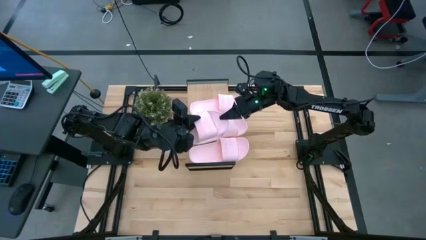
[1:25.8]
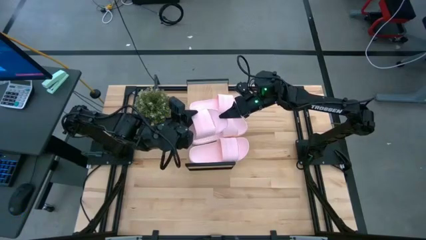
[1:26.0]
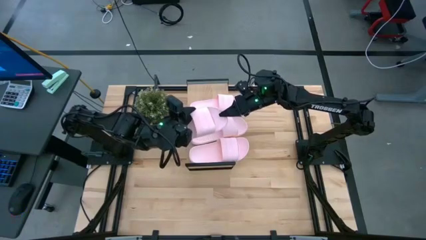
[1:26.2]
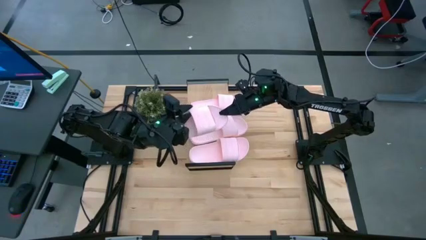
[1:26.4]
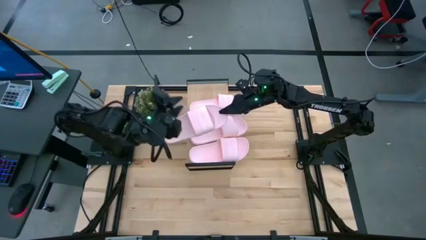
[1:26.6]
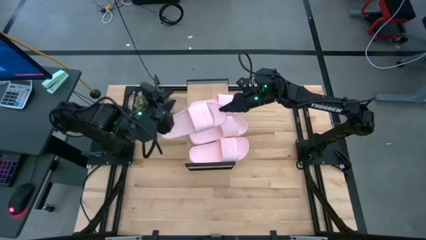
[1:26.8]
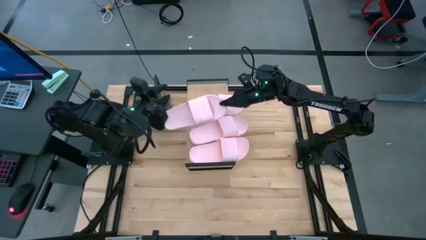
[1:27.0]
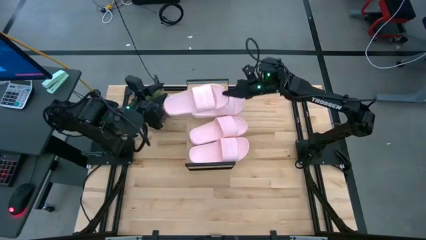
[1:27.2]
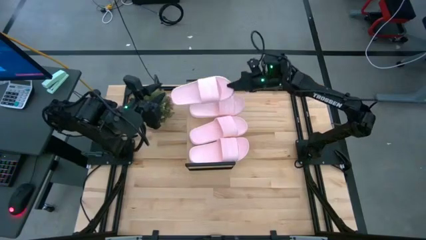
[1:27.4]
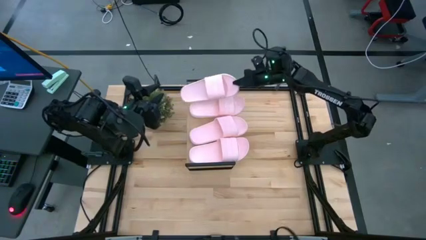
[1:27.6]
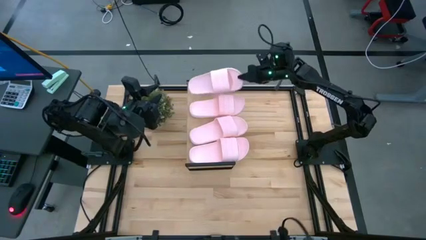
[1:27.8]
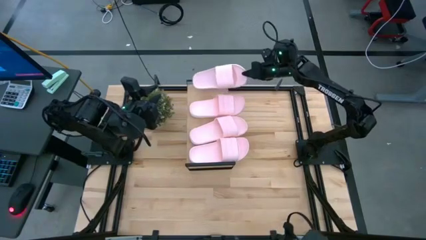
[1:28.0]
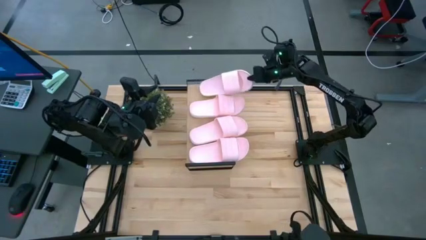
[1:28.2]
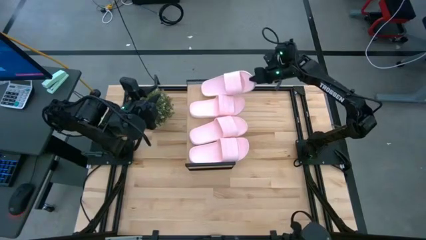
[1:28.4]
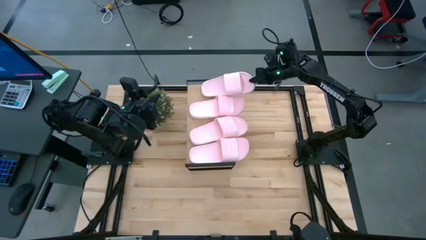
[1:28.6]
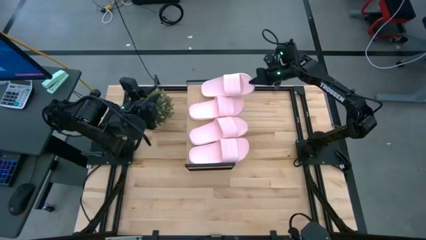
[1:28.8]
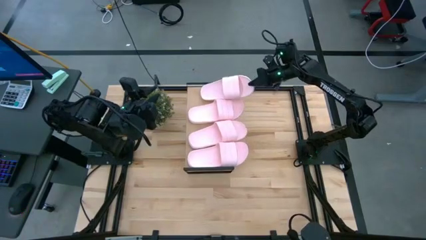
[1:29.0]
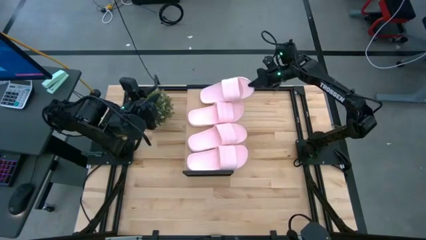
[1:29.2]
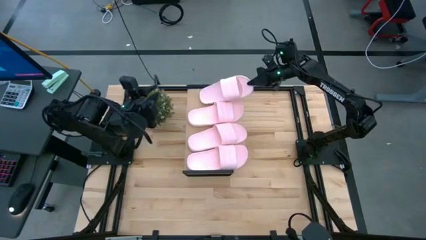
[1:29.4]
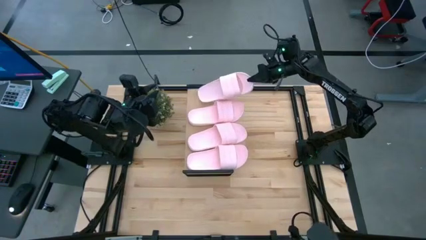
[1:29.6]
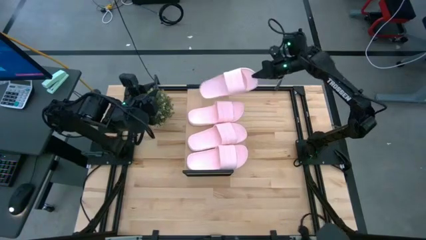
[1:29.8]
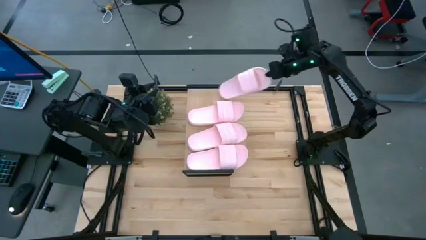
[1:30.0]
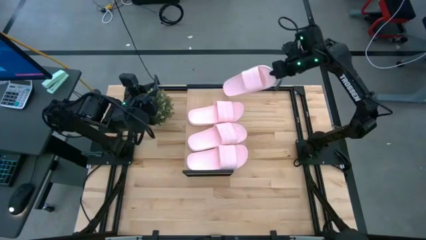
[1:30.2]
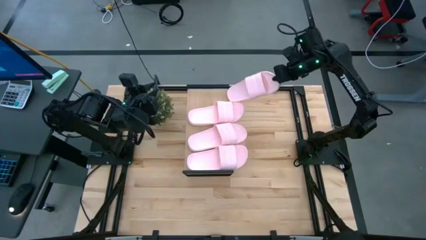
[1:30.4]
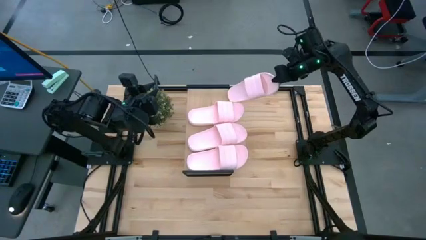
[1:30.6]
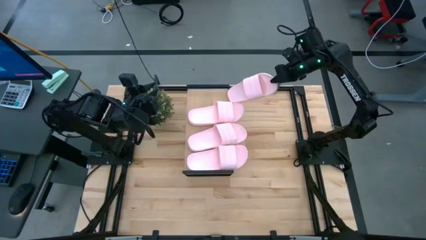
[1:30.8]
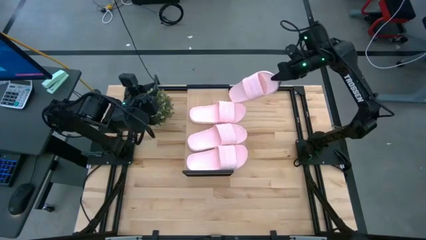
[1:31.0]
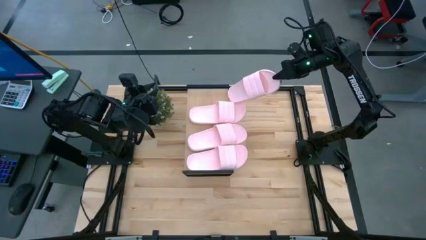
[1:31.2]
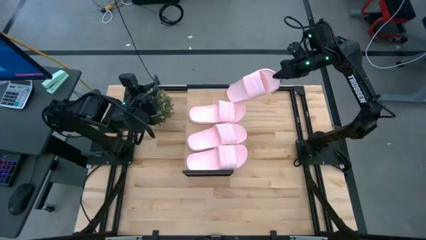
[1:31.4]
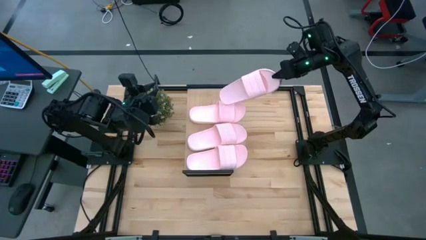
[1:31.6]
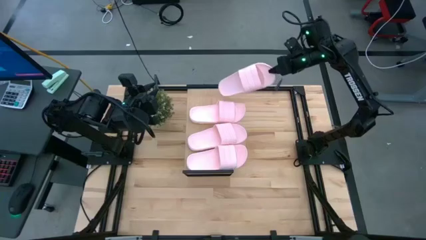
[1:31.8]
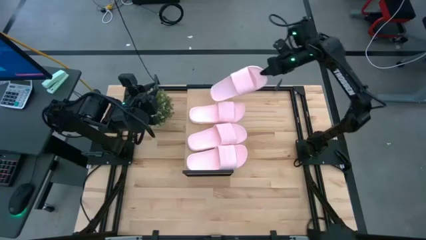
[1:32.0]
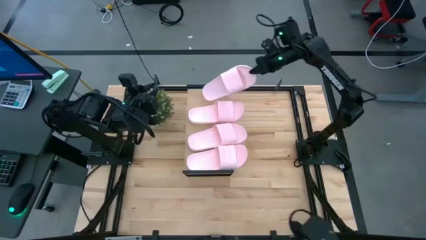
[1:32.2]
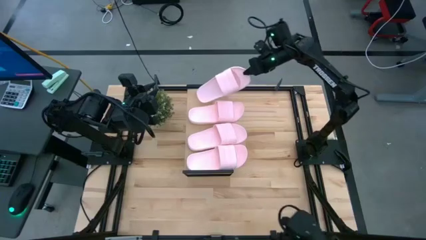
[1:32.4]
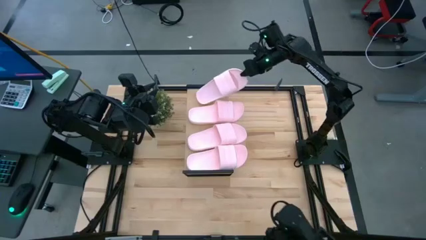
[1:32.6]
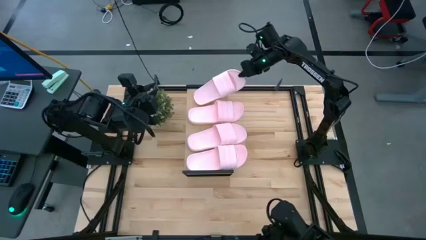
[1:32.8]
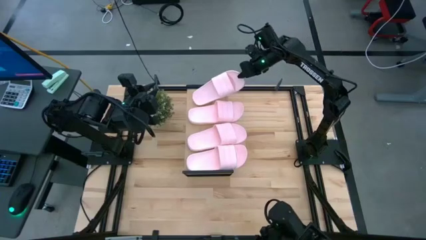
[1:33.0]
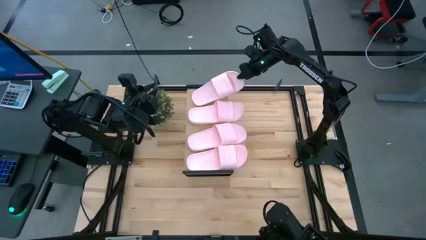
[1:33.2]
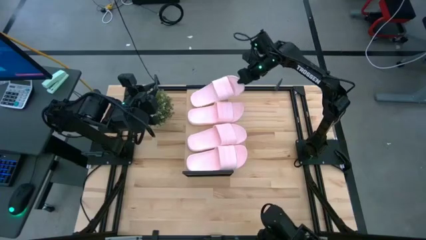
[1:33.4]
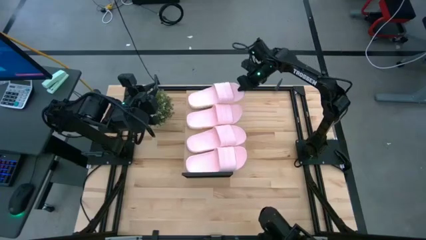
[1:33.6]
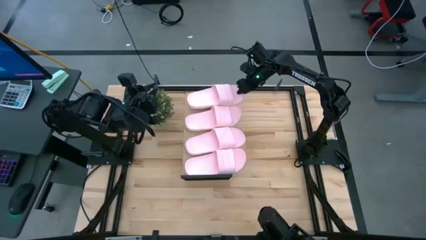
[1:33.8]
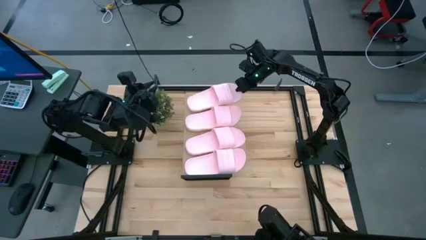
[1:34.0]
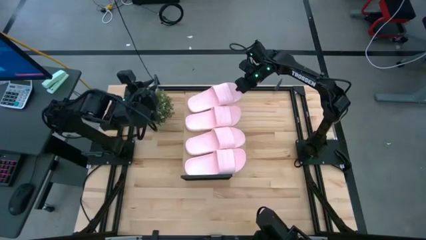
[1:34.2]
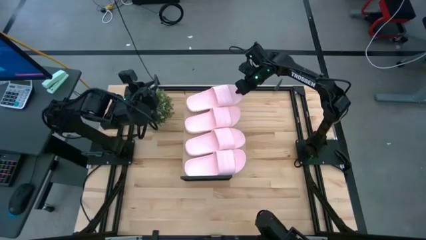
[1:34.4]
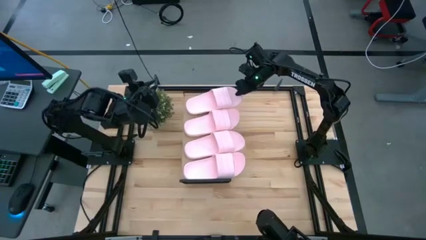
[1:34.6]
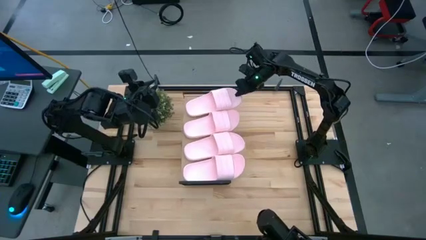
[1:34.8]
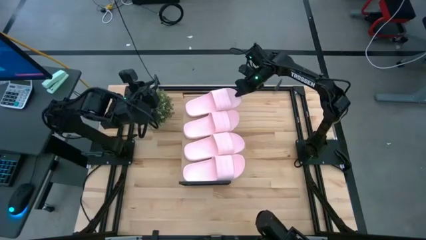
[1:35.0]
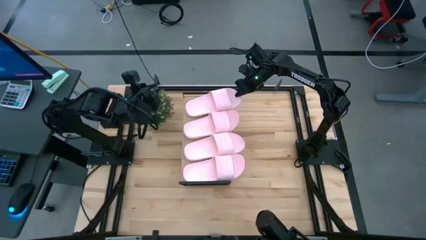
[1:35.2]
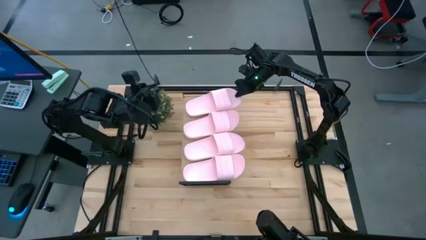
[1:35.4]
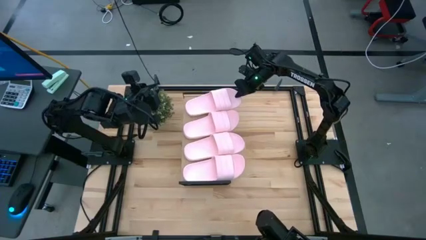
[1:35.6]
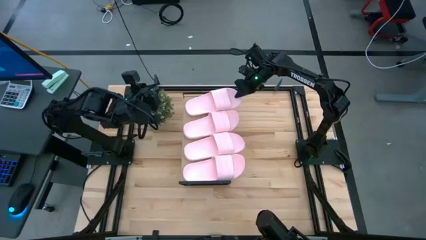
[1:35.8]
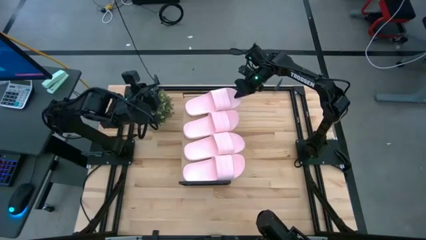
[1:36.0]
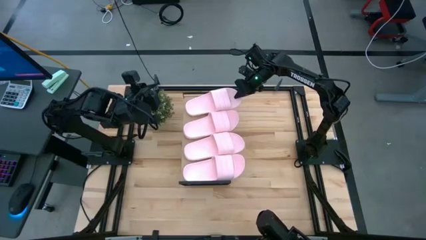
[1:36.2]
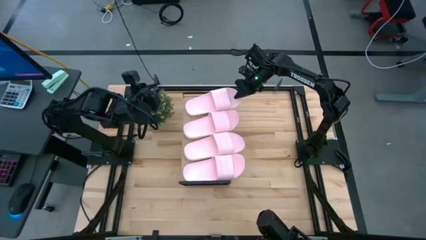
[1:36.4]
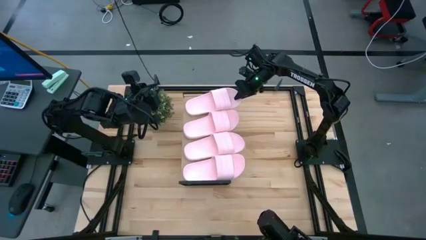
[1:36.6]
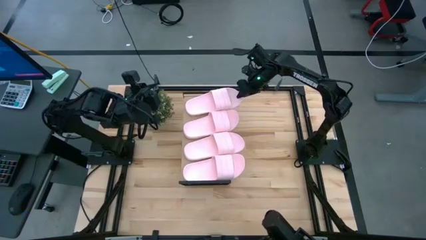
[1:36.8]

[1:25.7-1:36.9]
Task: Pick and place slides into the shelf
Put the pink slide on the shelf

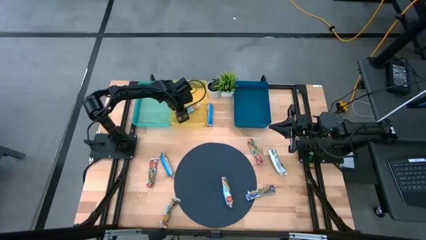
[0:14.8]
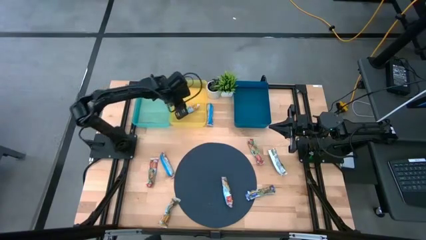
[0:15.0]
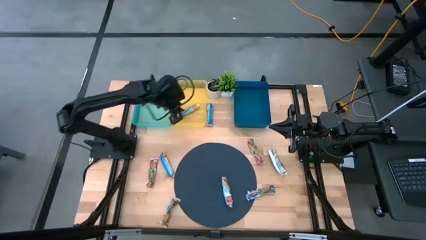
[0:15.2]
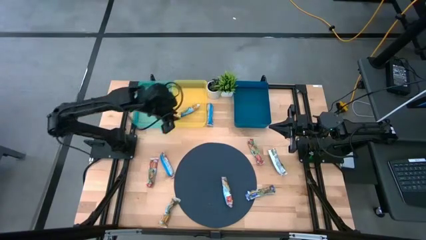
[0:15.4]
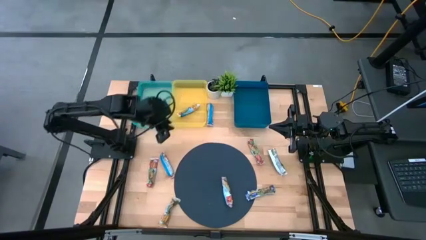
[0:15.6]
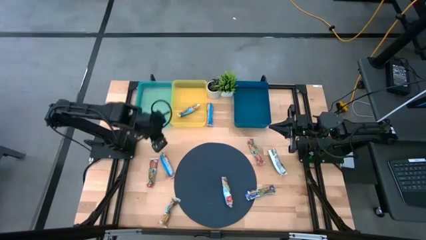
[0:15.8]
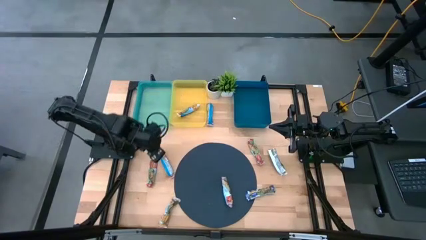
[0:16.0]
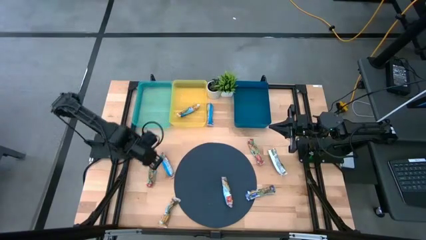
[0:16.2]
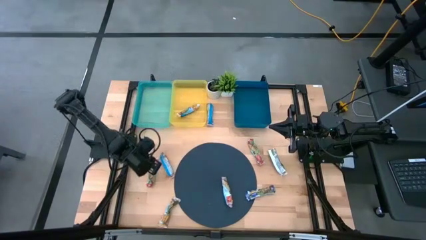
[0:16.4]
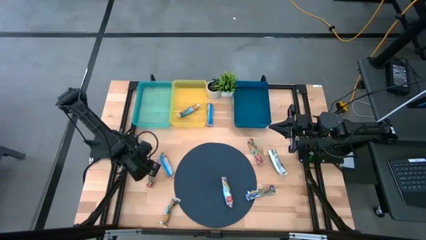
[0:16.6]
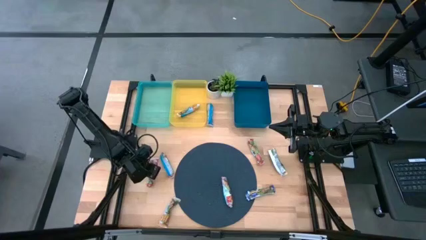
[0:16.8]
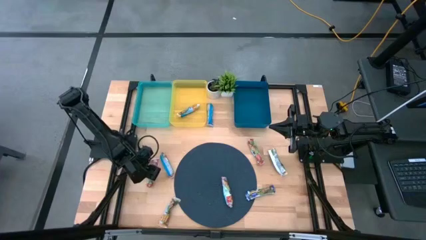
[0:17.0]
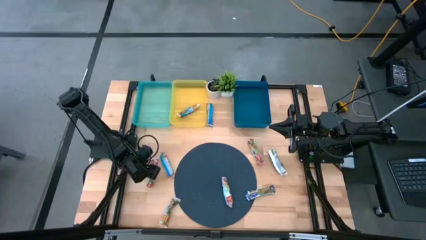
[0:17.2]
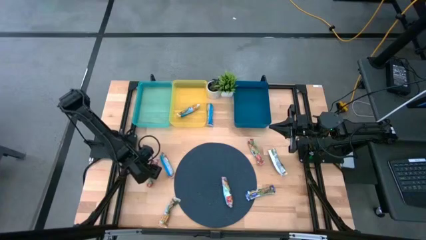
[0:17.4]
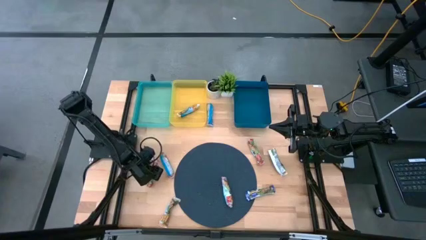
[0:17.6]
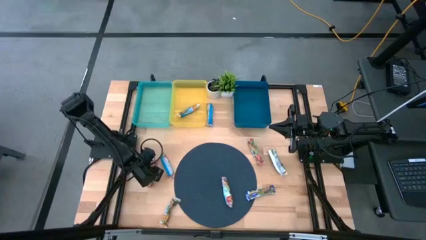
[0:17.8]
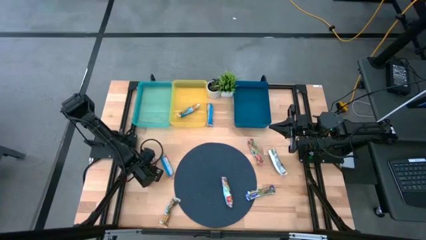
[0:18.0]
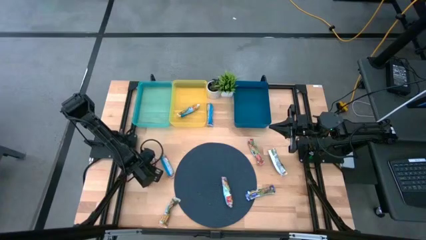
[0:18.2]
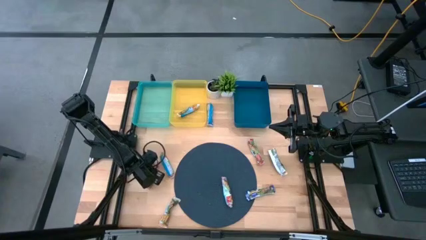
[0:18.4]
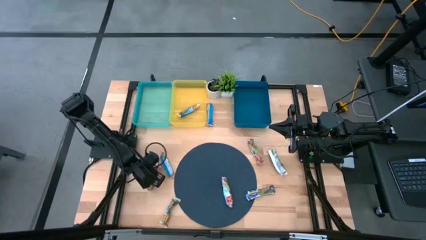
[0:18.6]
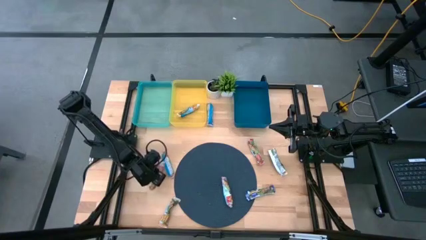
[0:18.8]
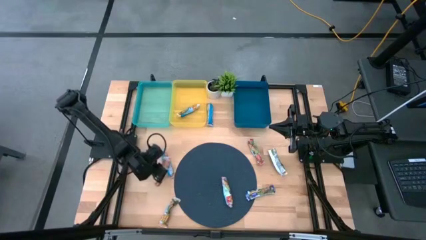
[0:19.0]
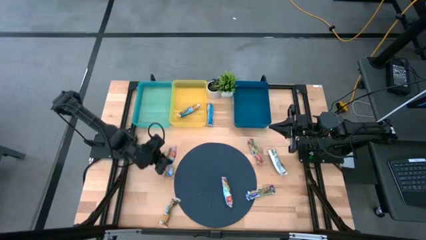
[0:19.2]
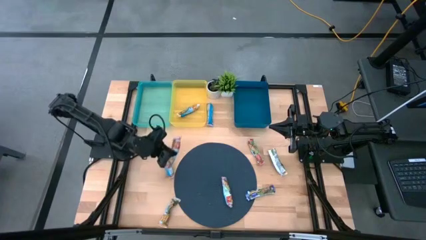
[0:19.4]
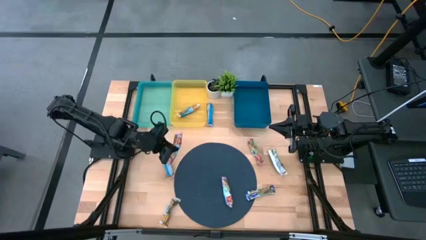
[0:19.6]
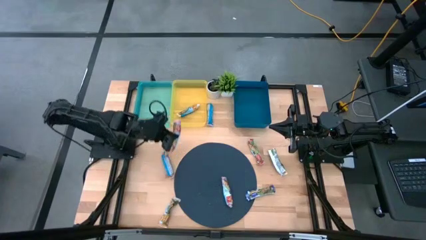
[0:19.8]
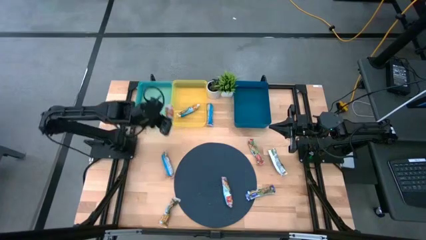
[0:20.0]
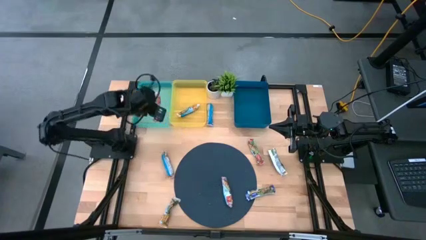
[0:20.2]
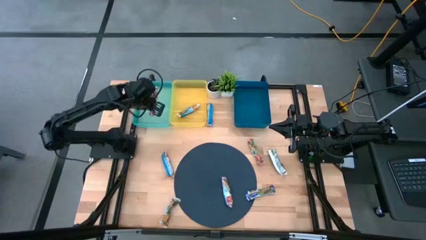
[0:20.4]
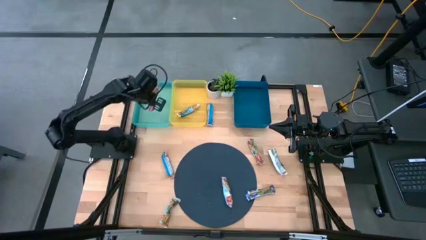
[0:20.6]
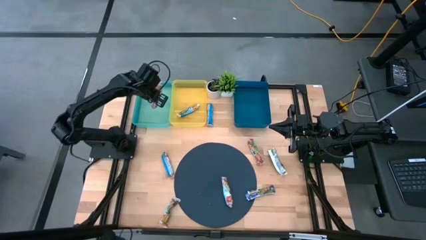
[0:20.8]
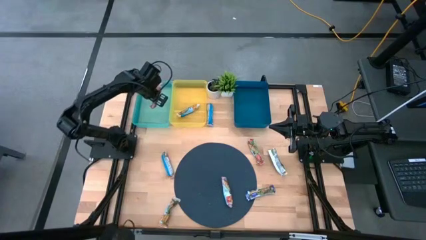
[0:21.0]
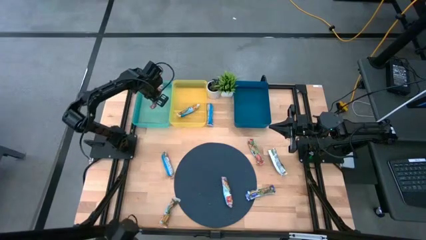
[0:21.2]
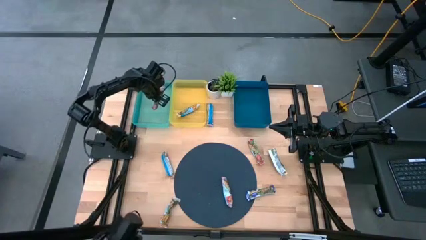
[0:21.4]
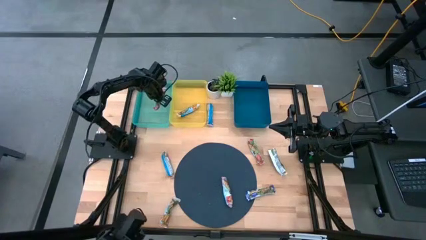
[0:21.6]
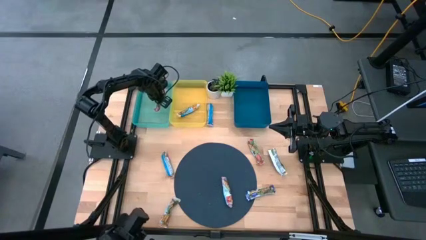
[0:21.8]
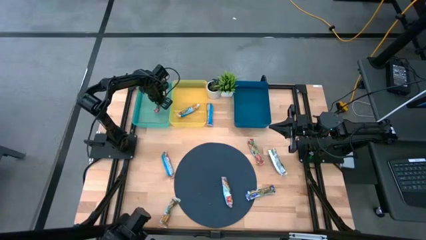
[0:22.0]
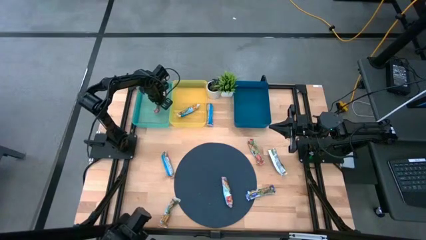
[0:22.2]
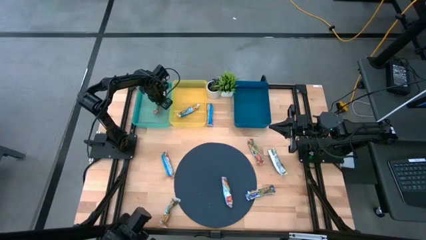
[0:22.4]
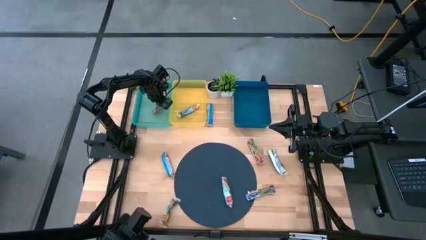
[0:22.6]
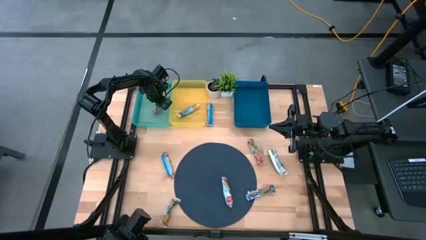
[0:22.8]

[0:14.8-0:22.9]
Task: Pick and place Granola Bars by type
Put the red granola bar into the green bin
